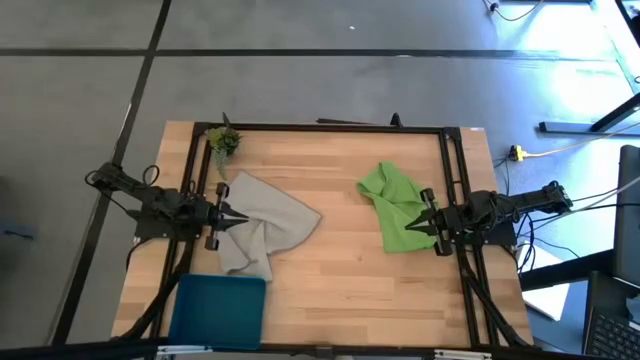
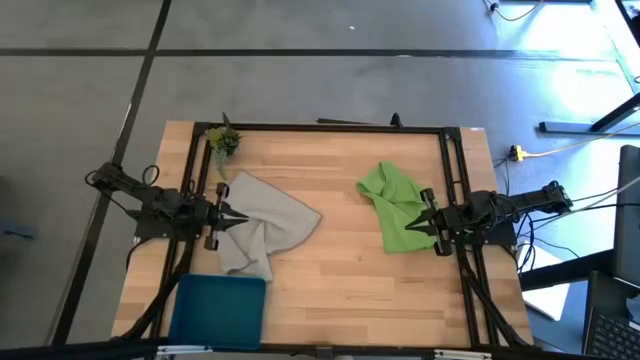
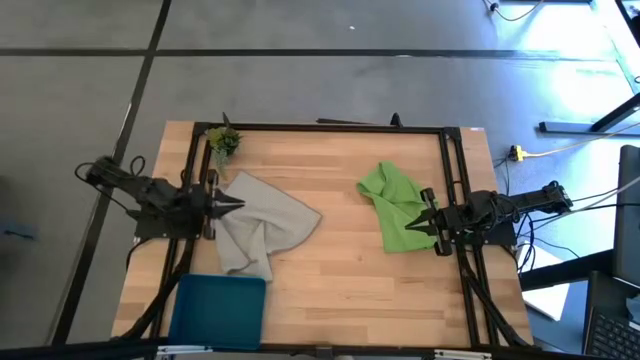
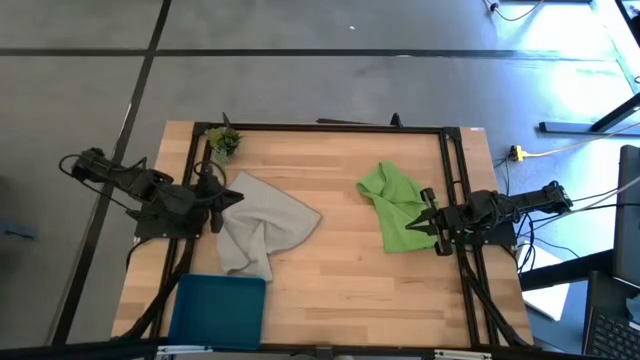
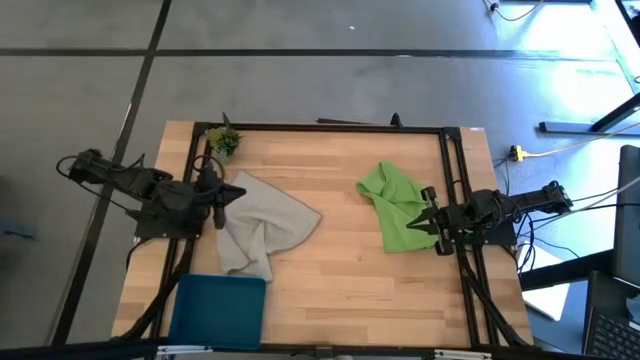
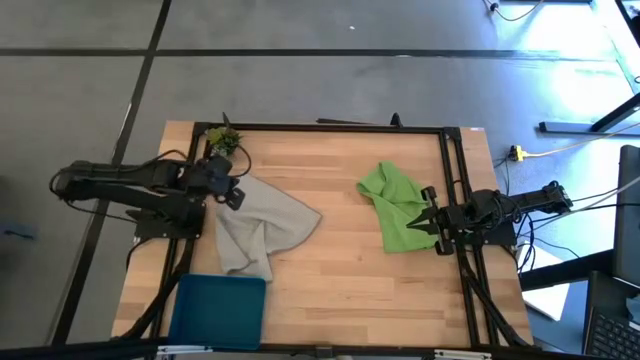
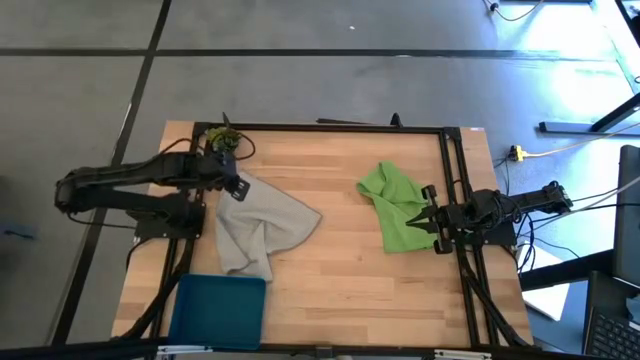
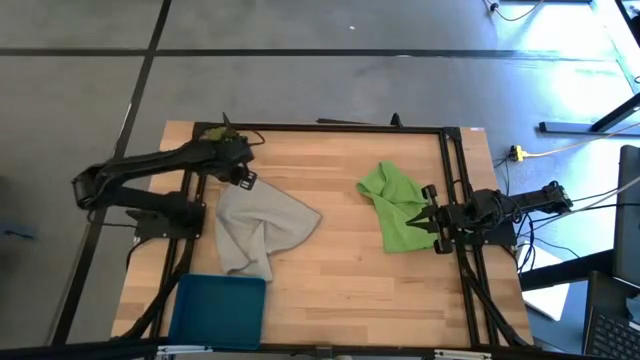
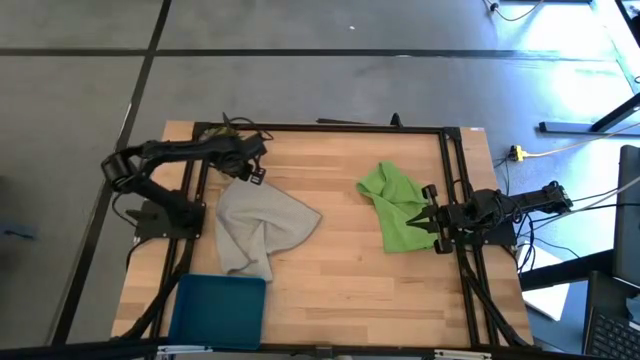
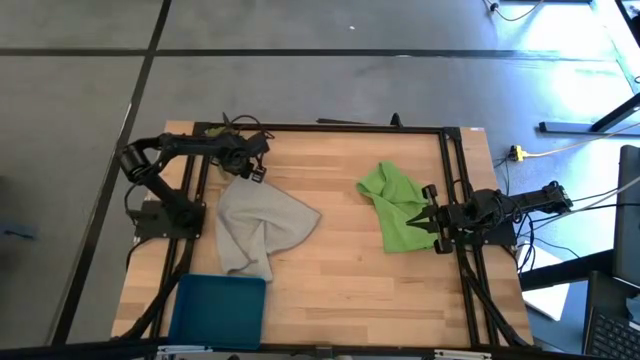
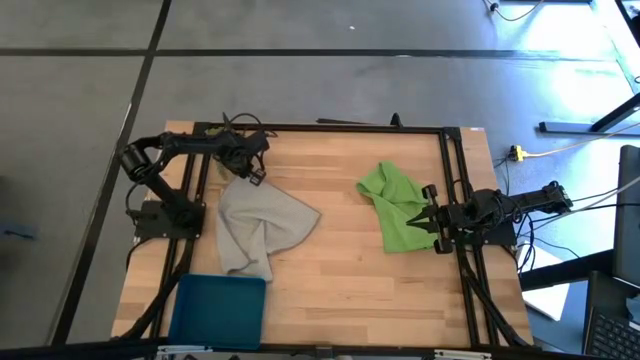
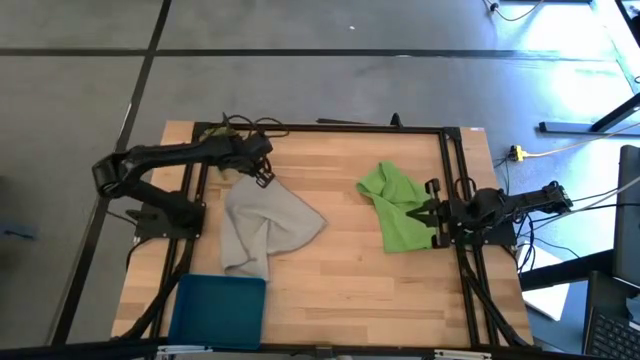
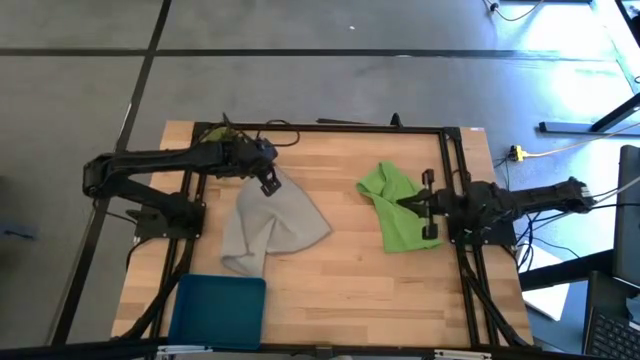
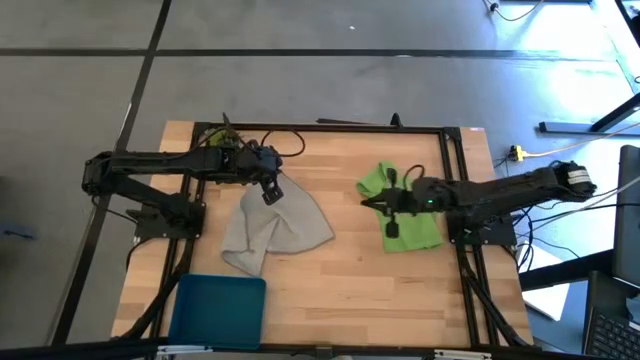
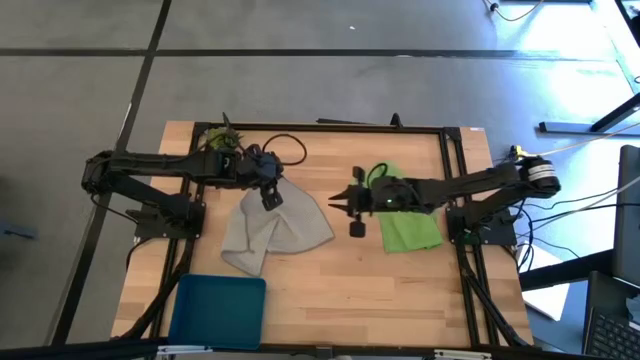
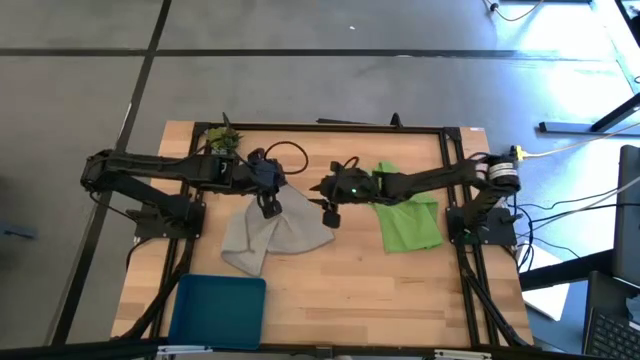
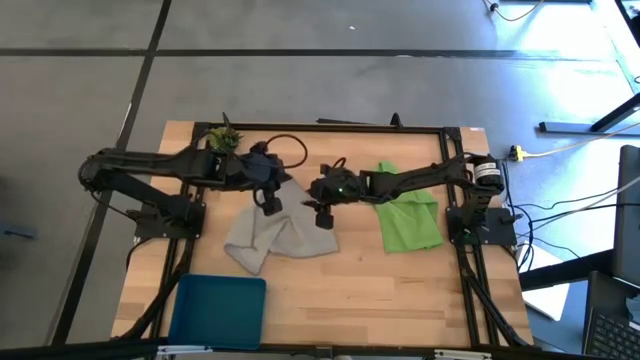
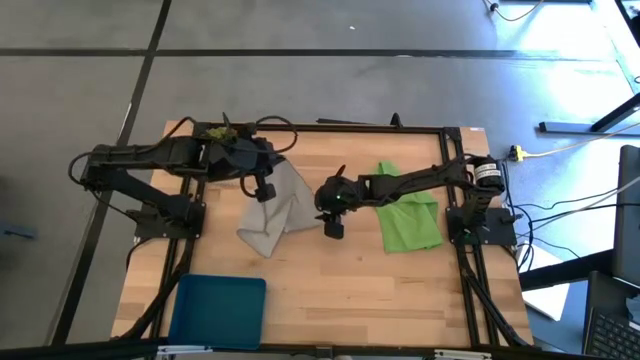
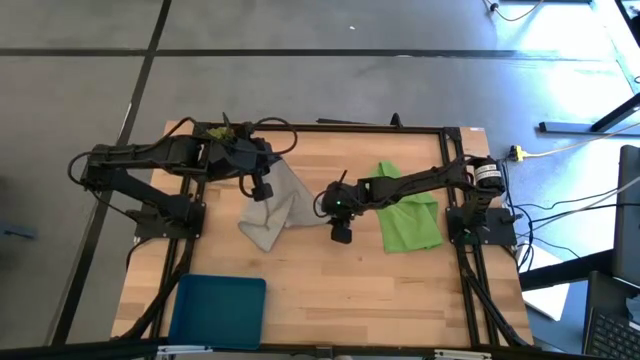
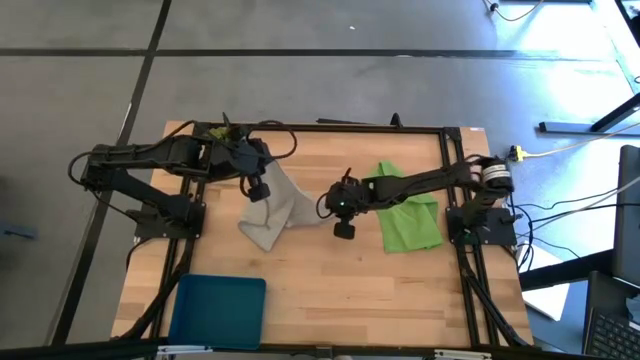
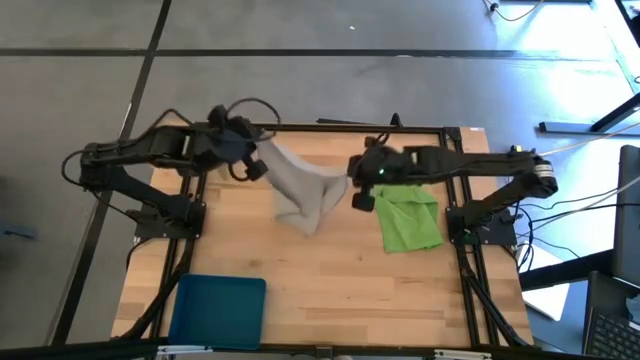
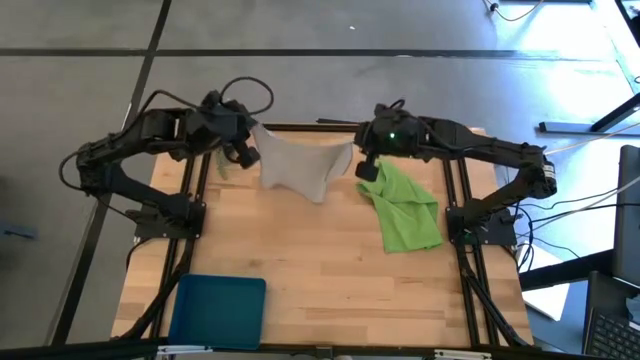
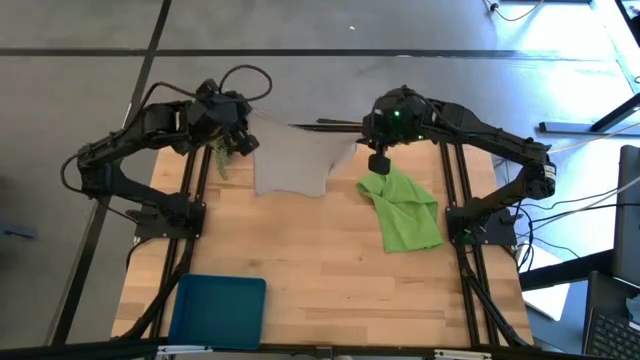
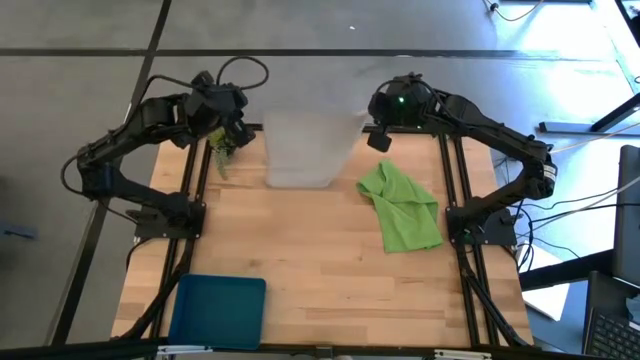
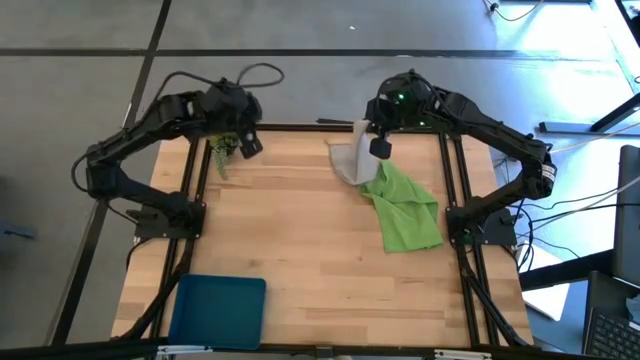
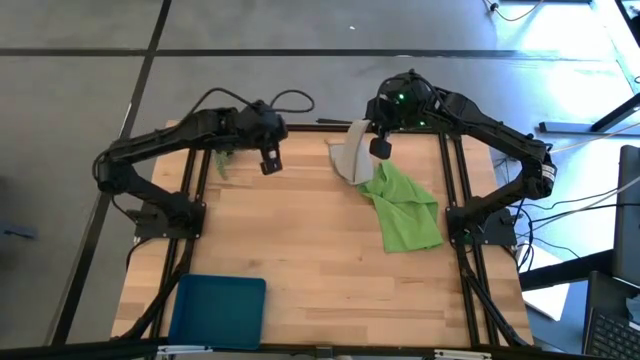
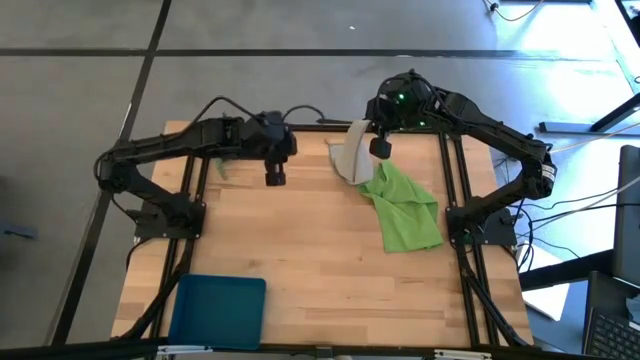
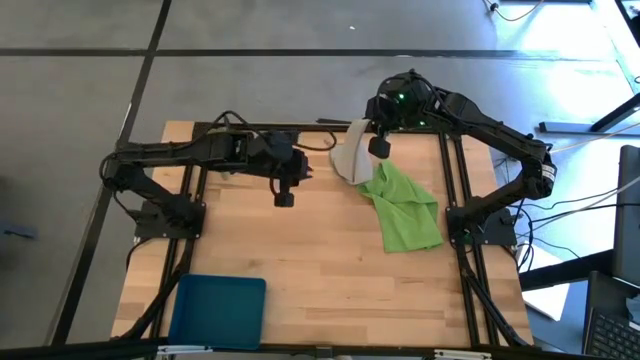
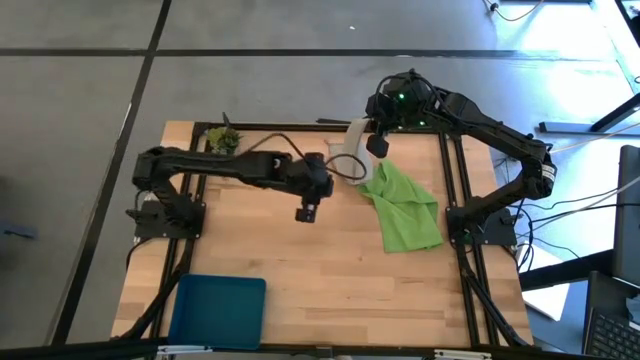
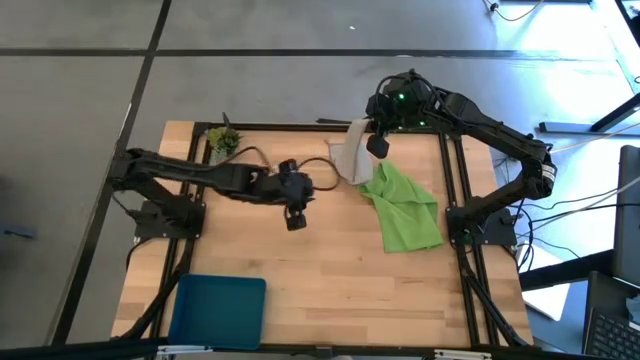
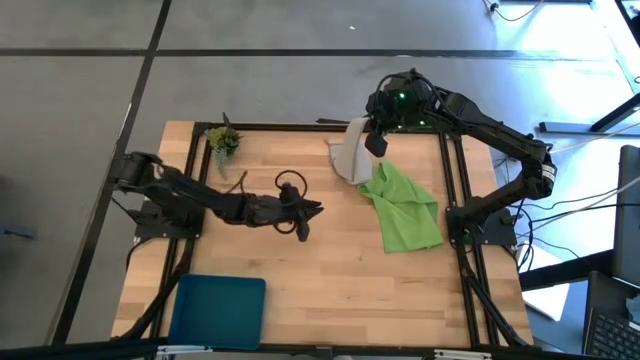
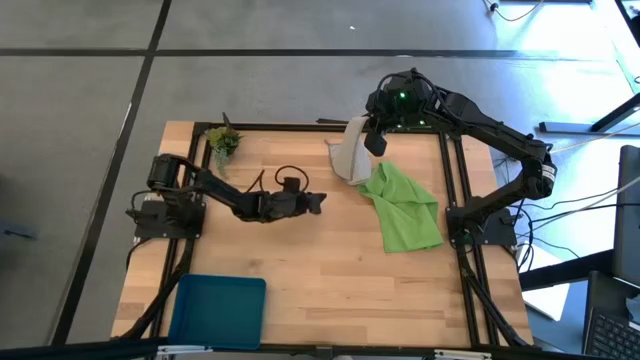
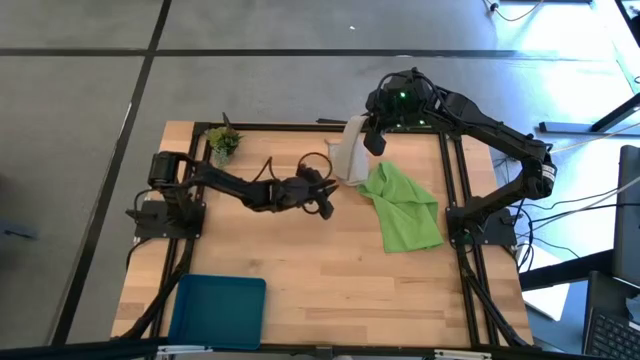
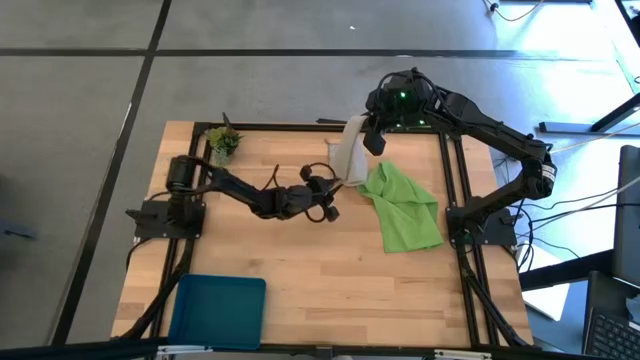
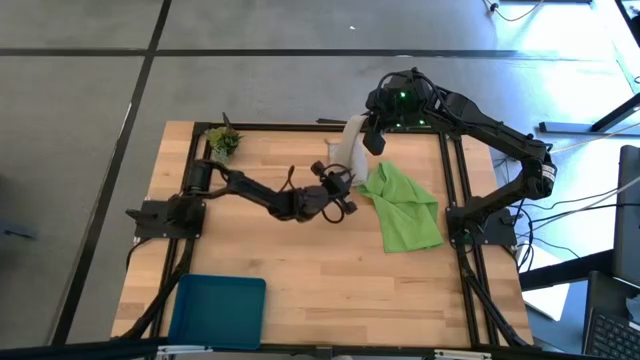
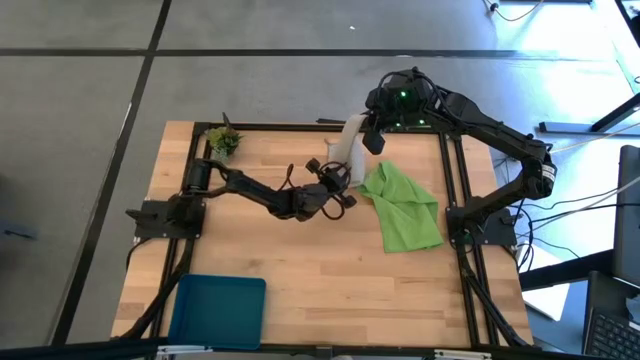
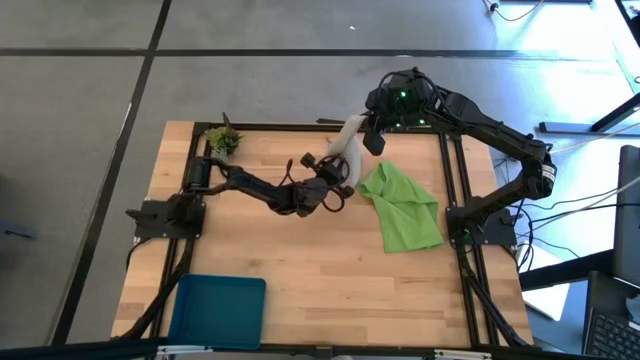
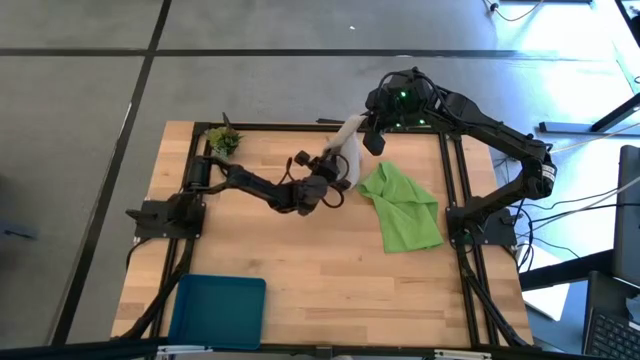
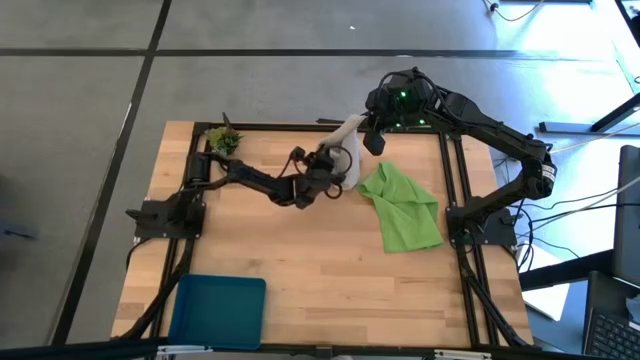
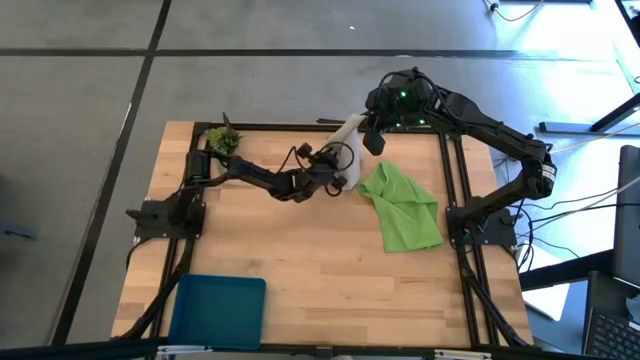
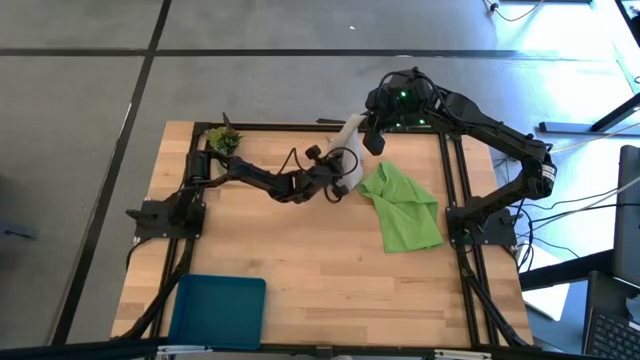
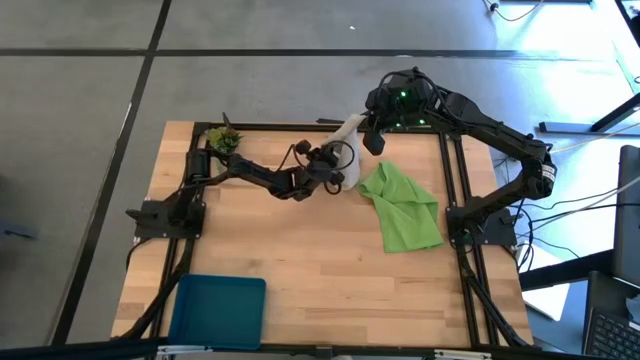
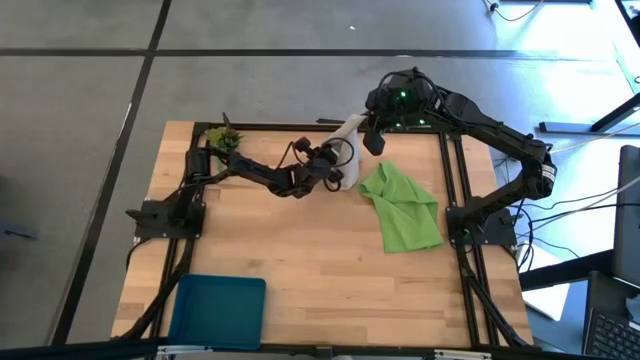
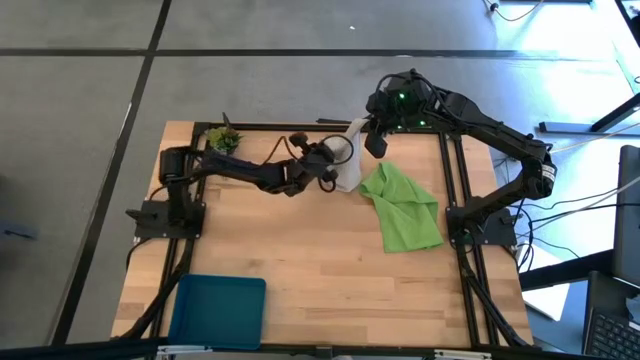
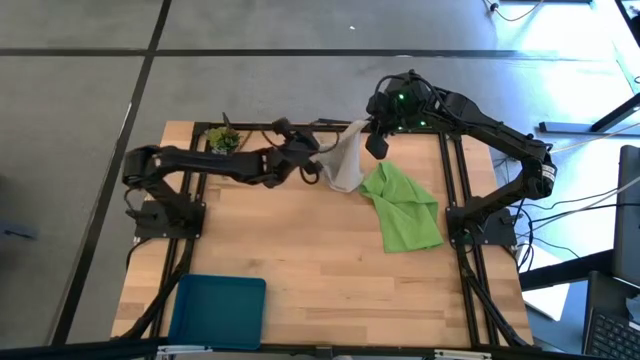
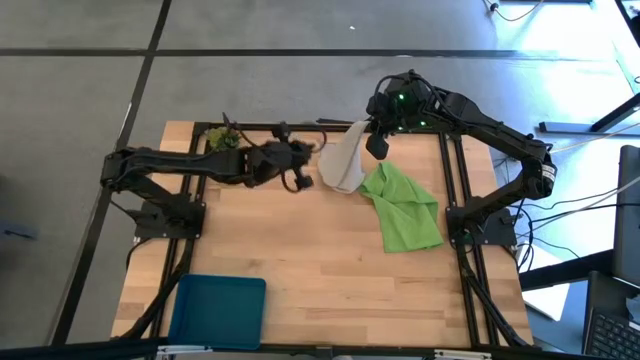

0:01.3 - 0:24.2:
Task: Fold microfiber towels
Fold the gray microfiber cloth
